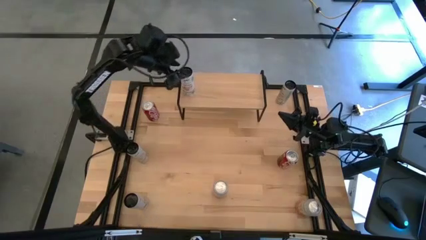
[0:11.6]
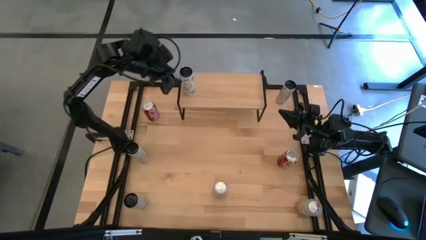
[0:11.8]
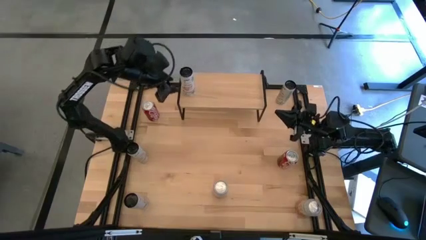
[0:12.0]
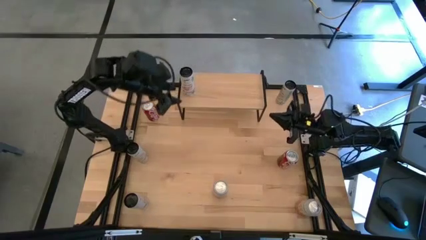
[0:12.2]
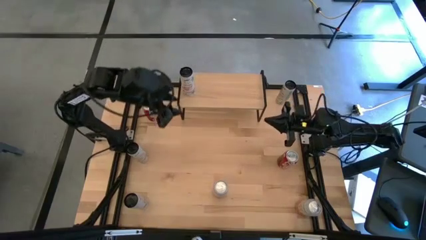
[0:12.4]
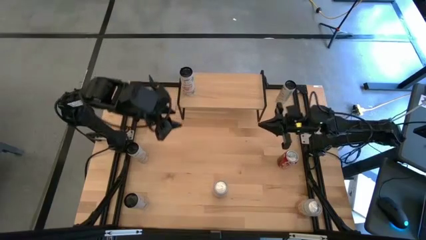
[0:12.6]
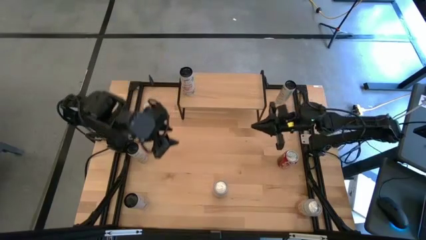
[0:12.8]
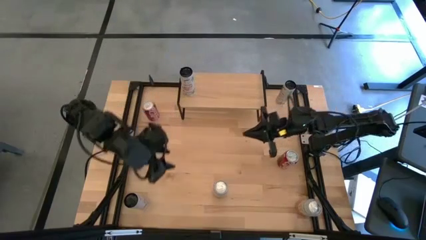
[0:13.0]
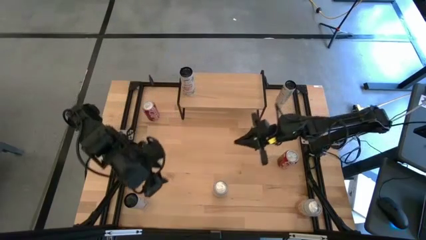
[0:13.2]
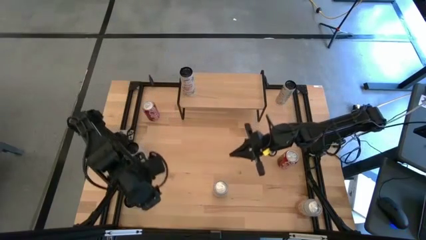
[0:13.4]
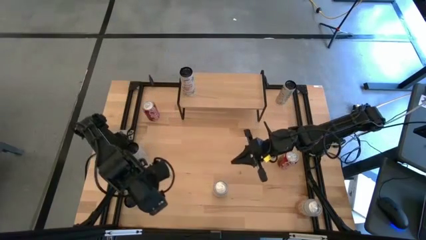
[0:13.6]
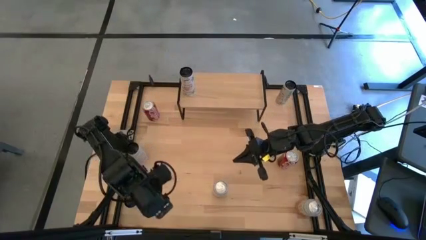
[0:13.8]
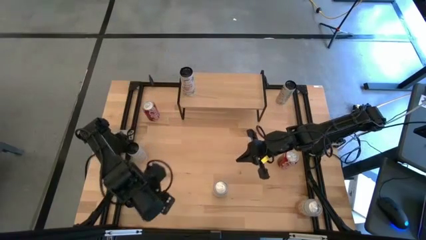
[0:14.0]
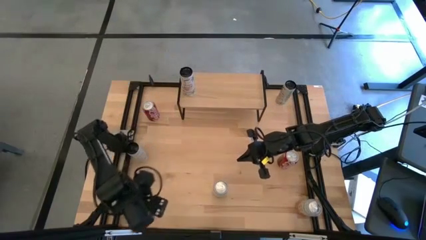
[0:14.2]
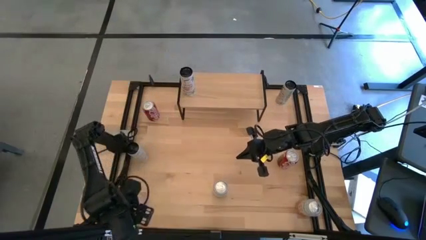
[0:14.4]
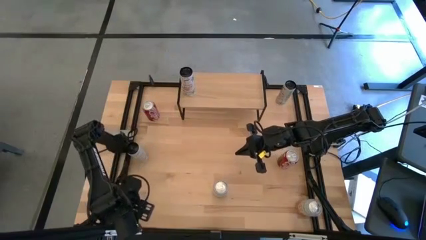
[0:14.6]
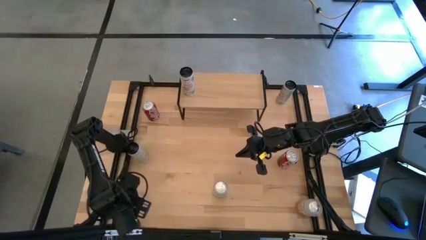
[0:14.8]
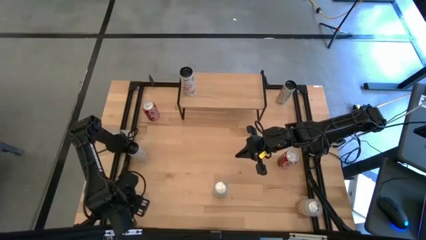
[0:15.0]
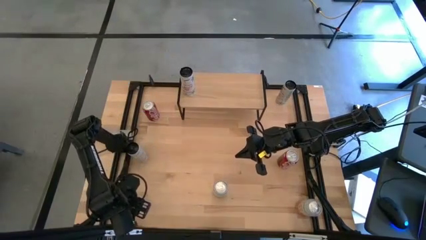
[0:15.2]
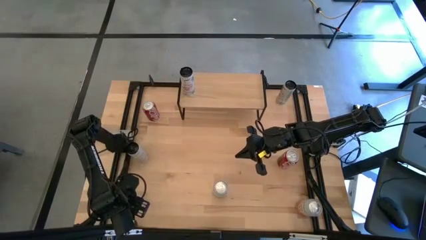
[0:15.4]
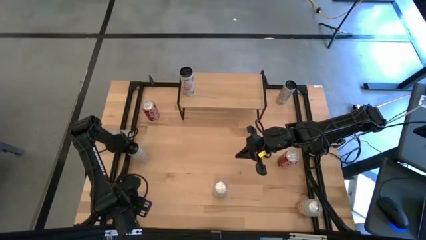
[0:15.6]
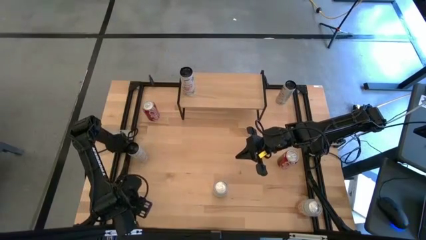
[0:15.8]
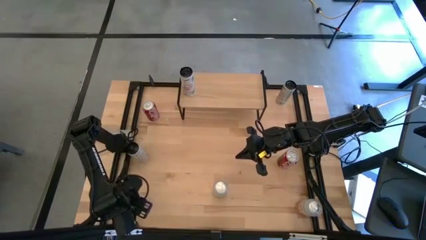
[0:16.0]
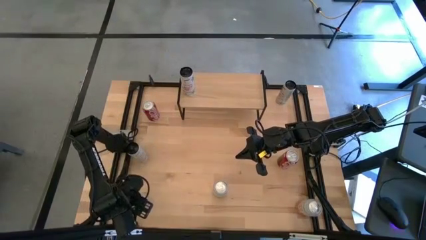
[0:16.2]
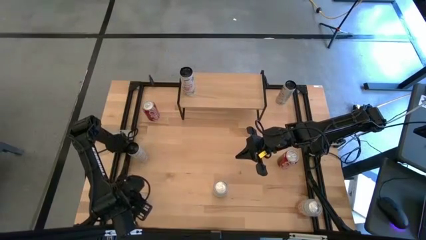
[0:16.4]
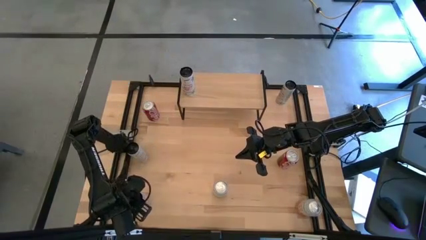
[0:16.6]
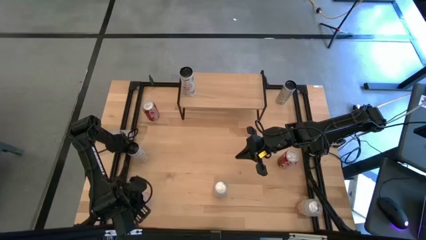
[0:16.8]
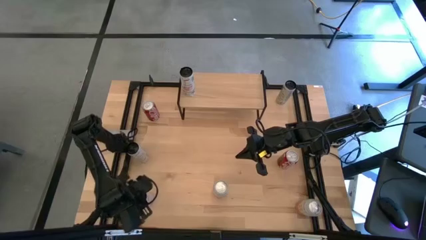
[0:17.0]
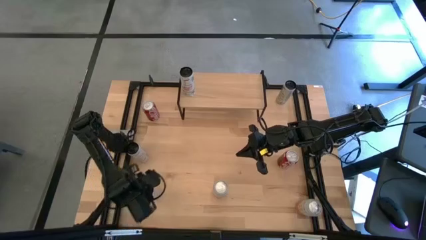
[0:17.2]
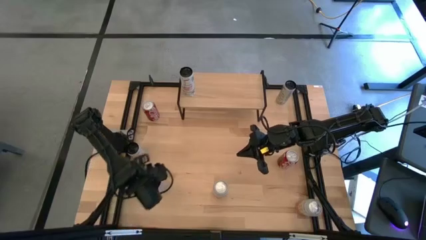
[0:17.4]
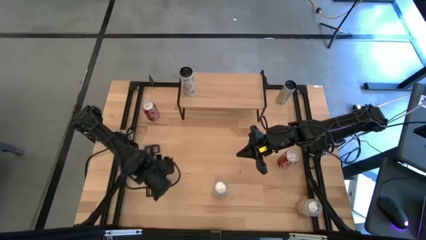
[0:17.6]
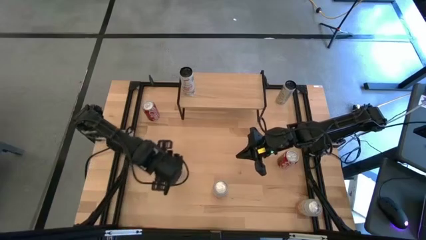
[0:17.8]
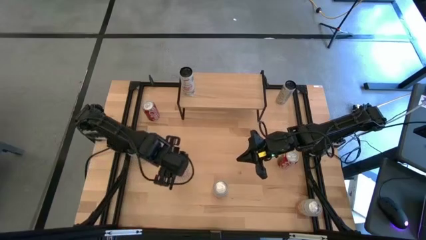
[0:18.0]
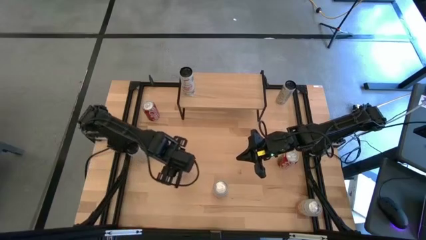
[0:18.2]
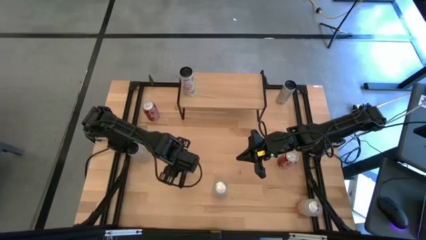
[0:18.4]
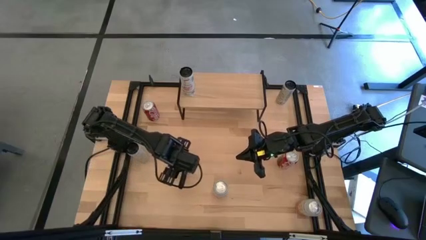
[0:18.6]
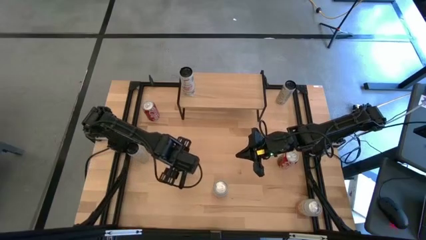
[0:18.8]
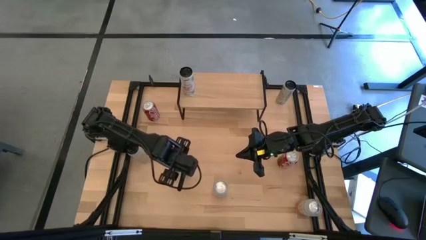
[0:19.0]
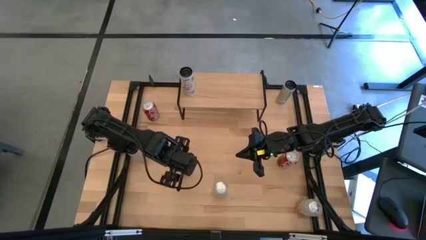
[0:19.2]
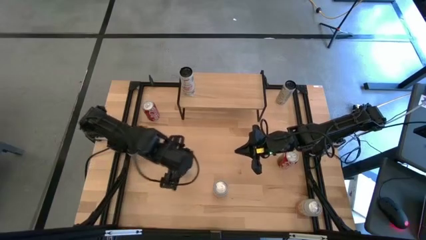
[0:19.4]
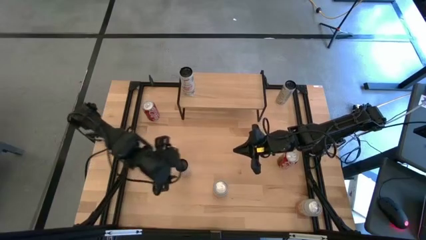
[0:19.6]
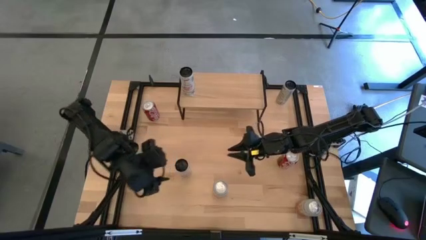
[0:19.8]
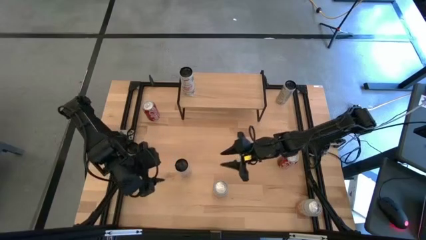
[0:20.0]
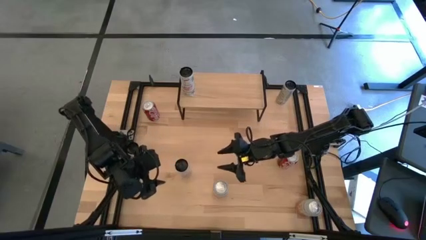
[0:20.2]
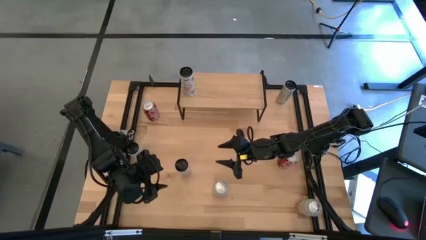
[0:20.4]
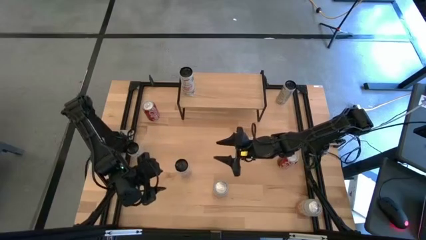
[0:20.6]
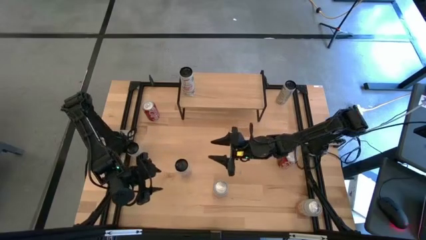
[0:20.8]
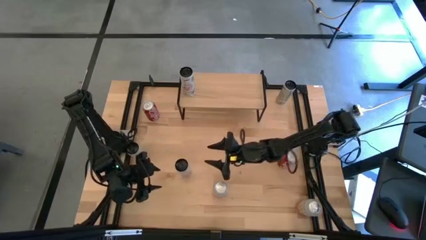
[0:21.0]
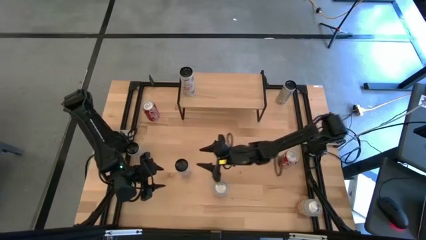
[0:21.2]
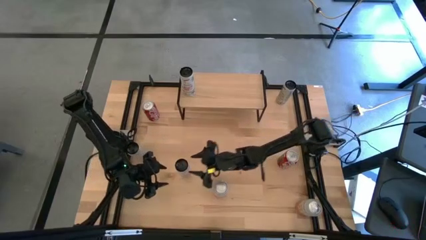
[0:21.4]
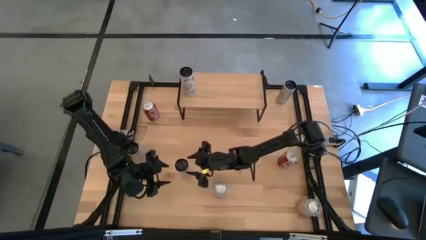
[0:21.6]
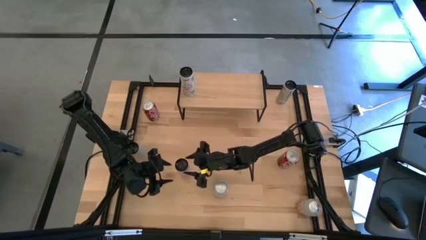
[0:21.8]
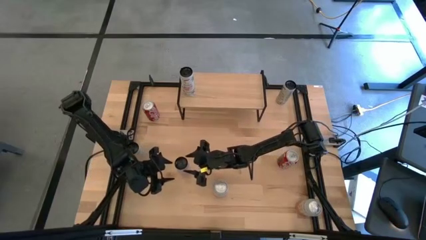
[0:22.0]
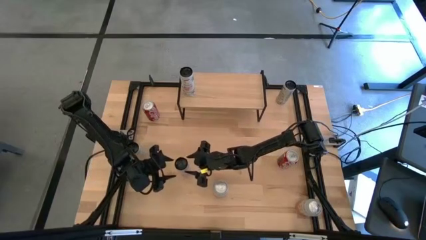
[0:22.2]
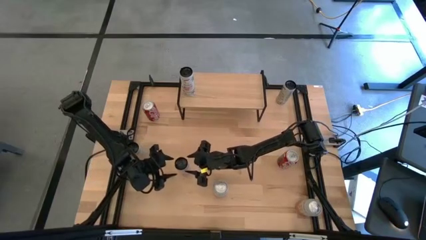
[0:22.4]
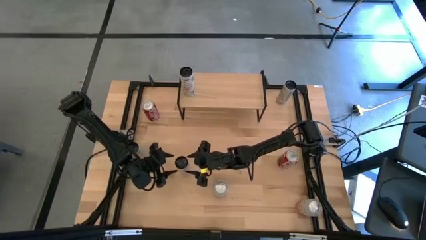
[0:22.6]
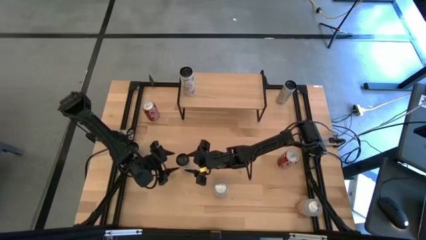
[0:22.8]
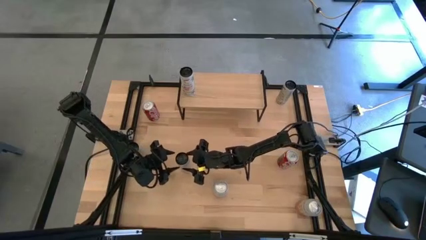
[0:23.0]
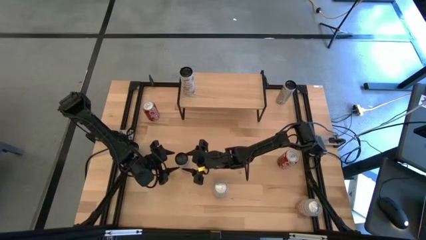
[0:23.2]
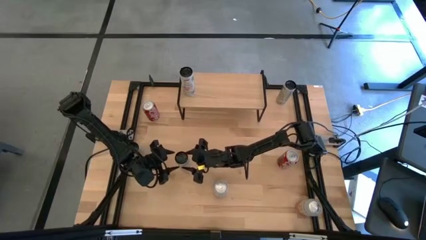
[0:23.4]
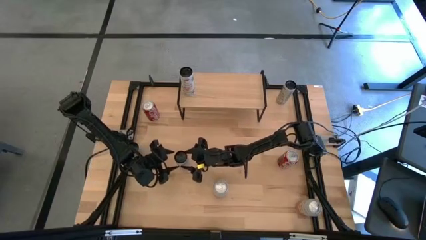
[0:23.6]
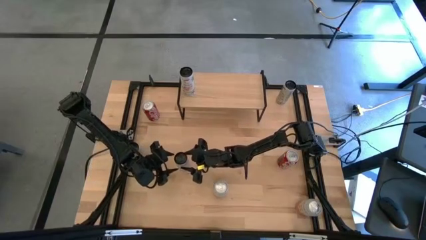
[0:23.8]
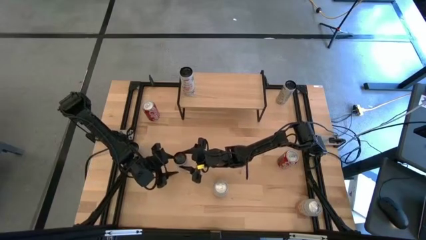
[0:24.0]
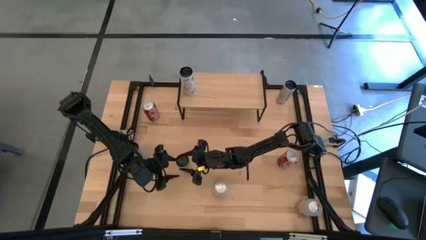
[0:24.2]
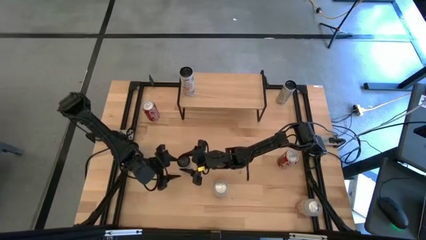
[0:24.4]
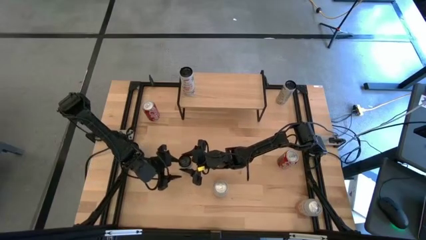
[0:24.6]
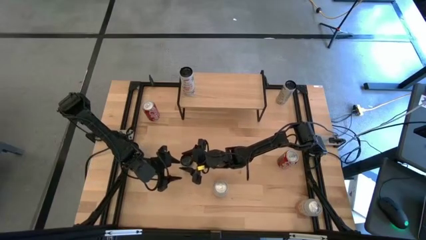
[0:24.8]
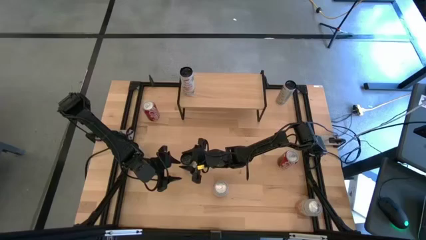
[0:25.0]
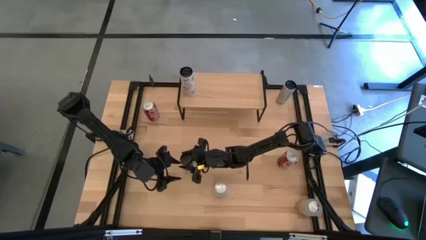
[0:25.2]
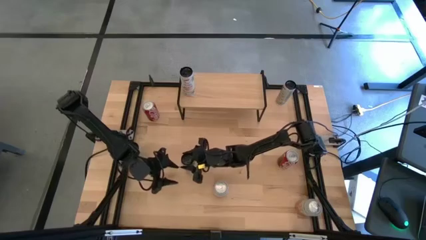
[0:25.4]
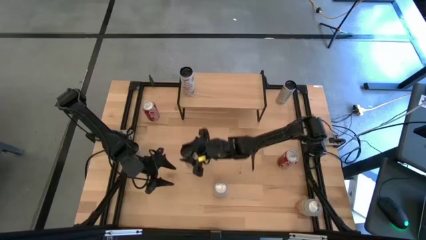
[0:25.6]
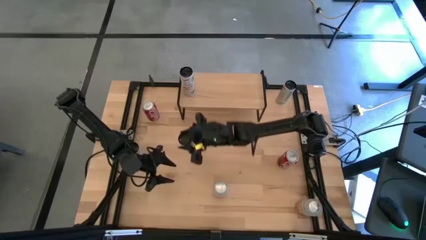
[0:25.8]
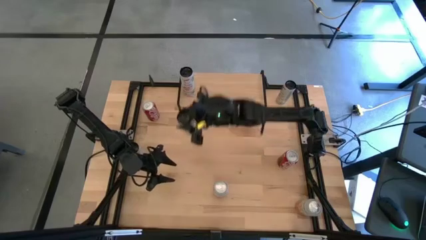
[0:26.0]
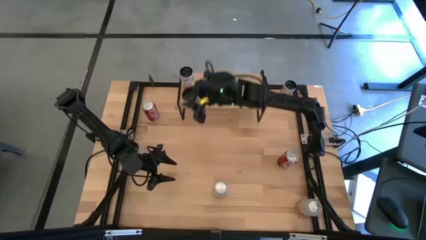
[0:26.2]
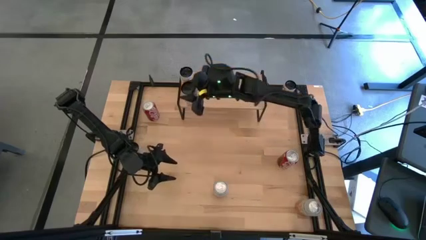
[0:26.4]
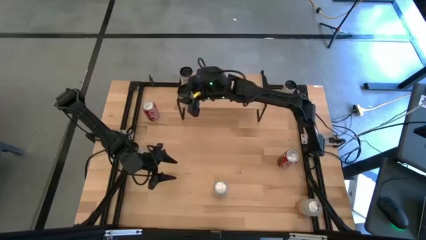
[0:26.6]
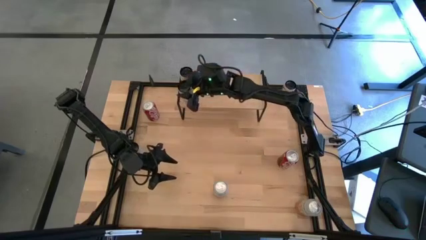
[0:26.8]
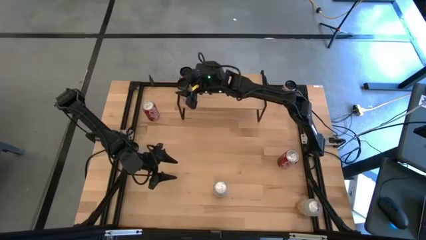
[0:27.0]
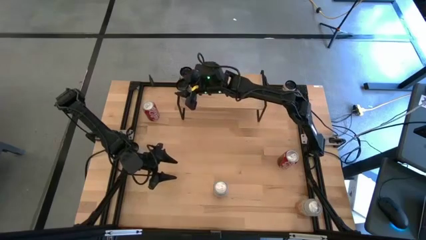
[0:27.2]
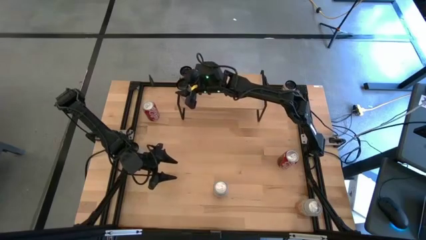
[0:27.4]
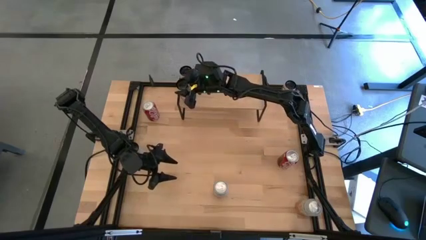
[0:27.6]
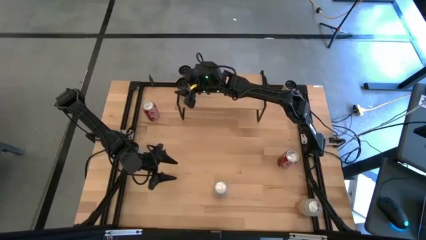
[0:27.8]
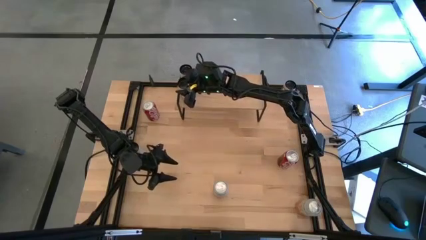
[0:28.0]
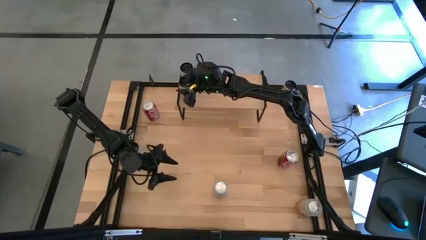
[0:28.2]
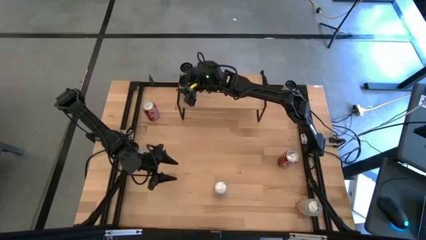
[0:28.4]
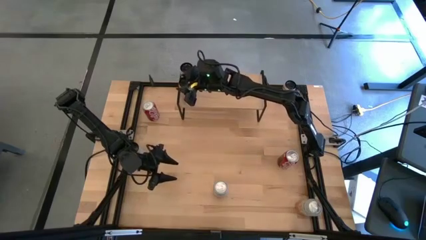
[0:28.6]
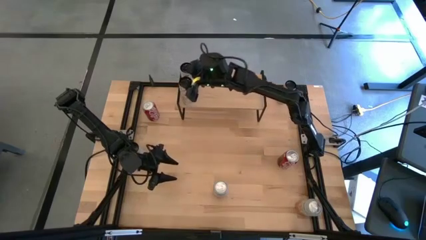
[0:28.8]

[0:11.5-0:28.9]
Task: Place canned beverage on shelf
Put the white soda can aligned with the other white soda can on the shelf
